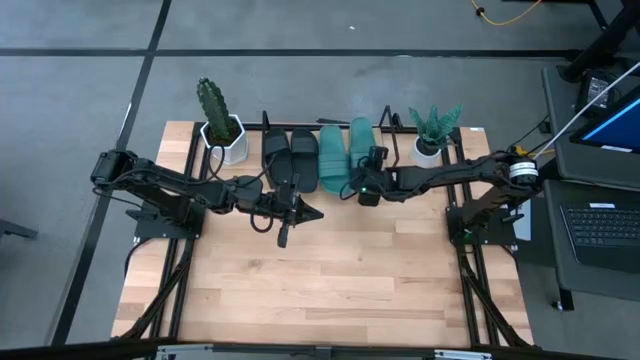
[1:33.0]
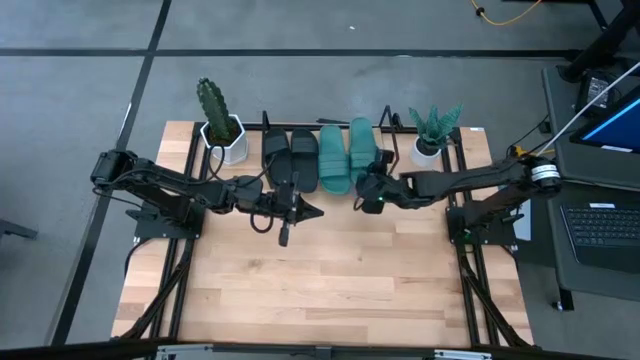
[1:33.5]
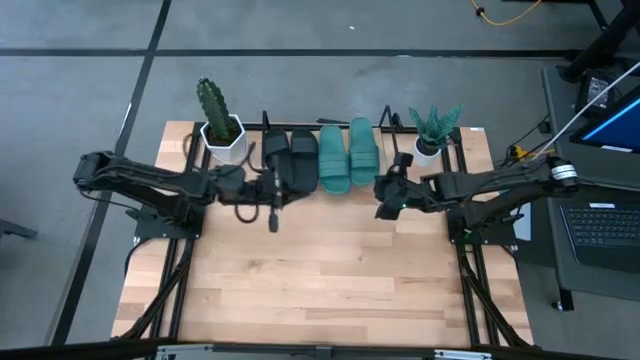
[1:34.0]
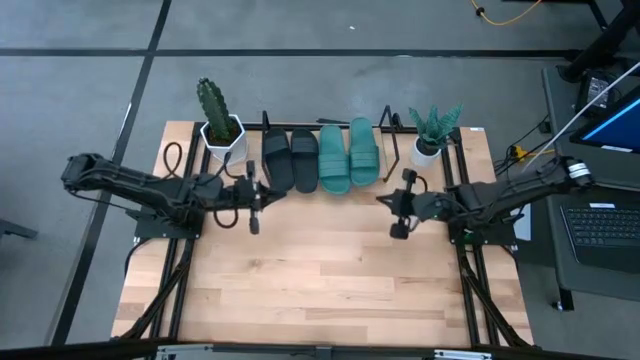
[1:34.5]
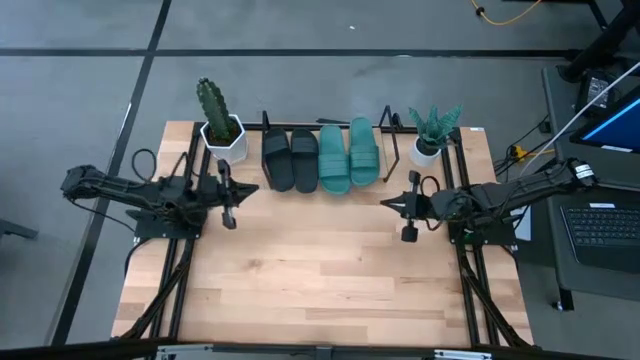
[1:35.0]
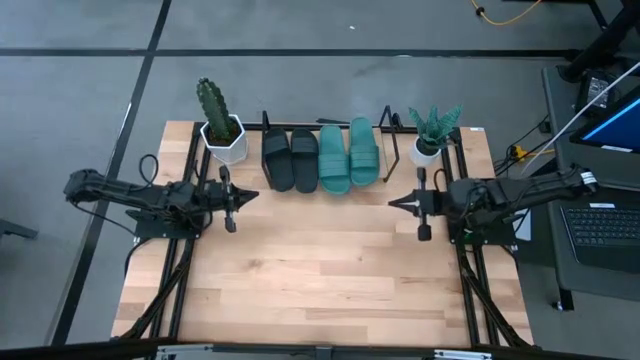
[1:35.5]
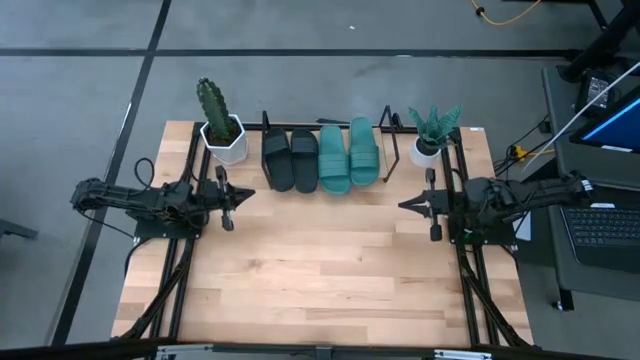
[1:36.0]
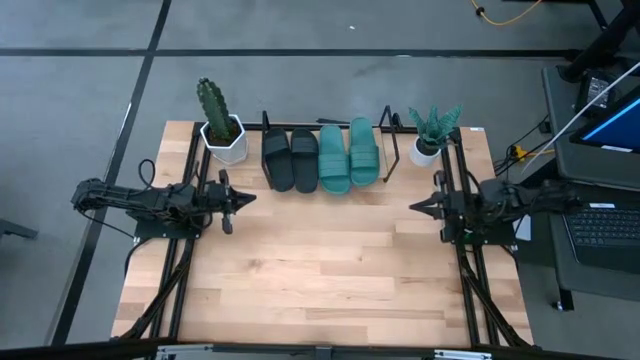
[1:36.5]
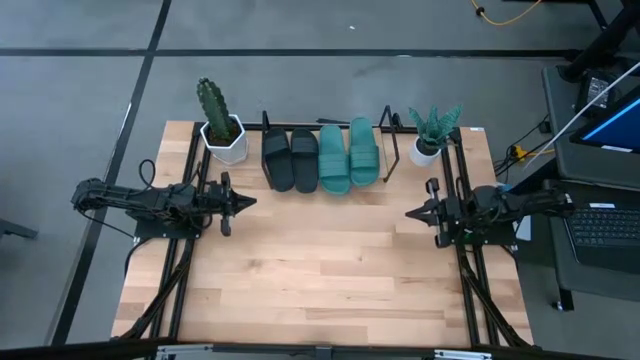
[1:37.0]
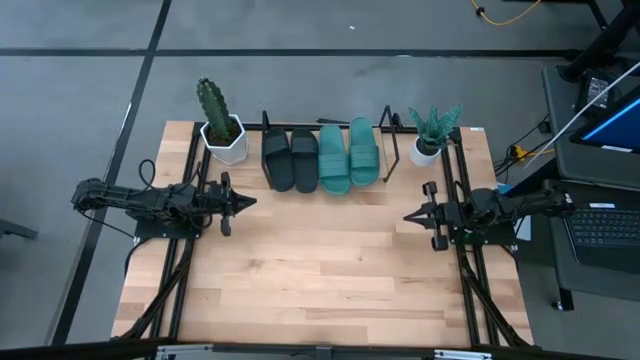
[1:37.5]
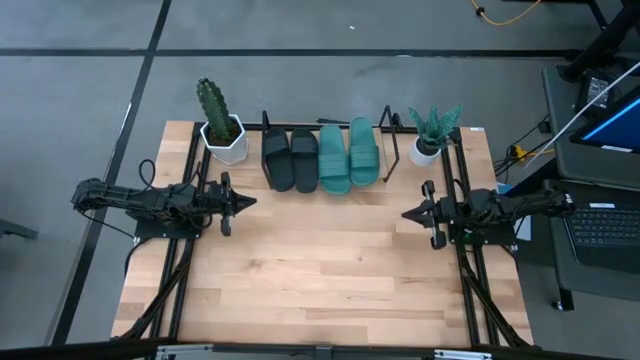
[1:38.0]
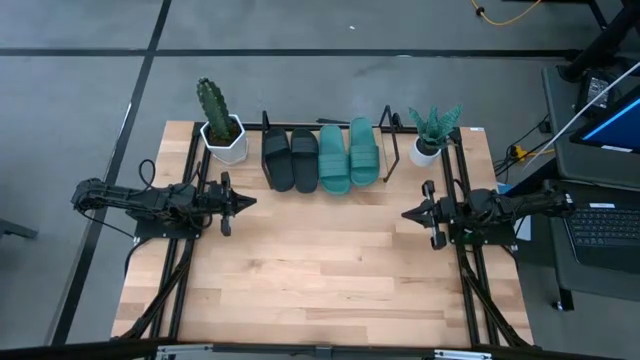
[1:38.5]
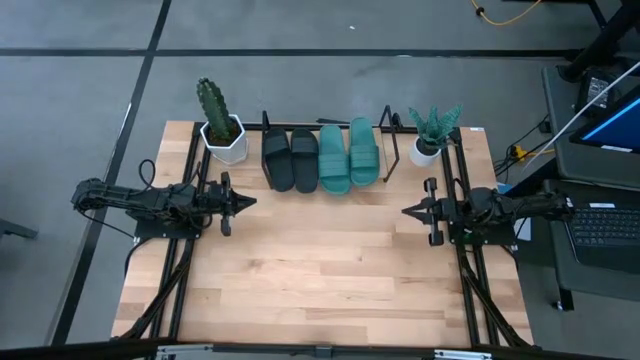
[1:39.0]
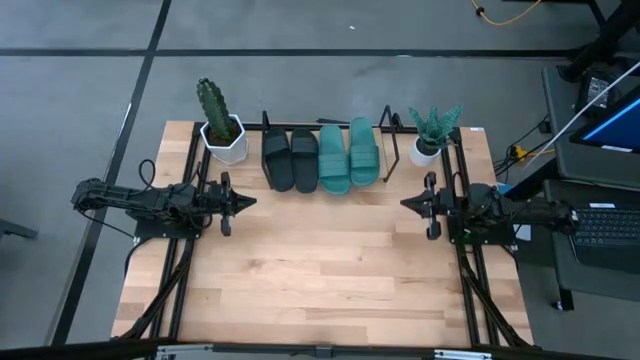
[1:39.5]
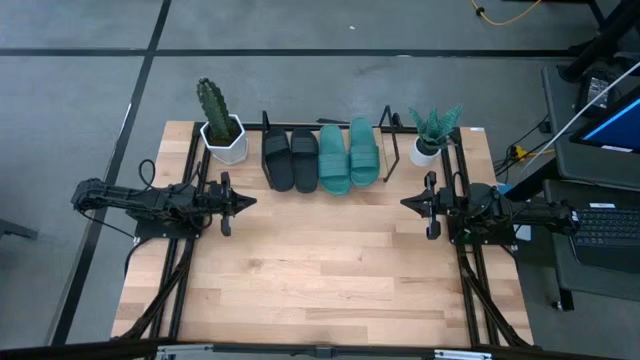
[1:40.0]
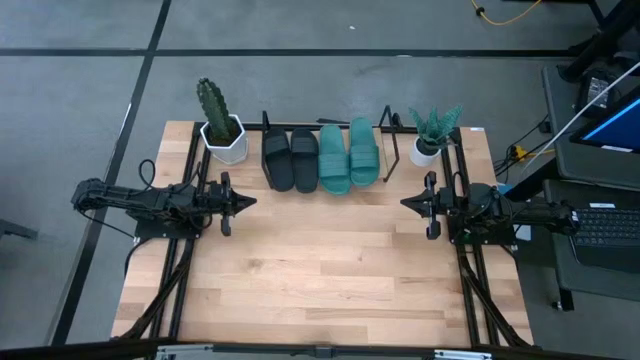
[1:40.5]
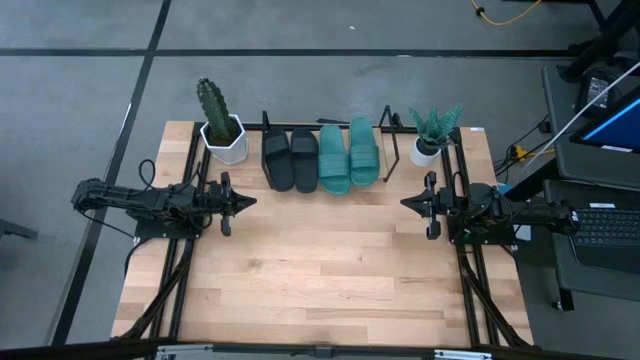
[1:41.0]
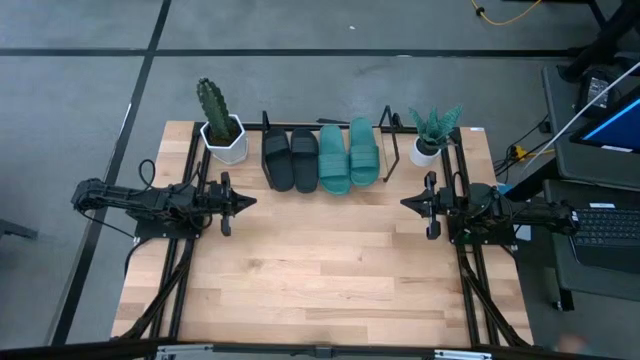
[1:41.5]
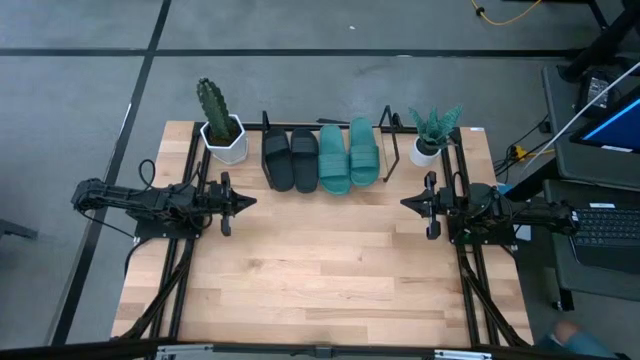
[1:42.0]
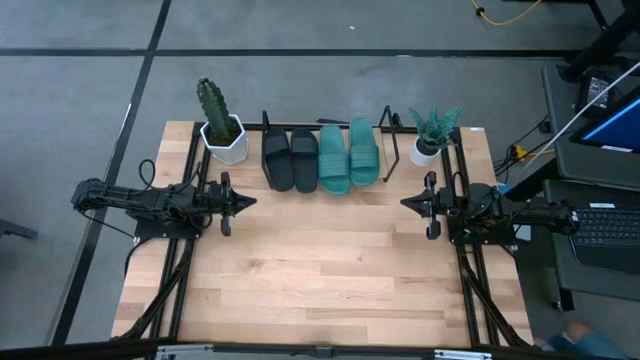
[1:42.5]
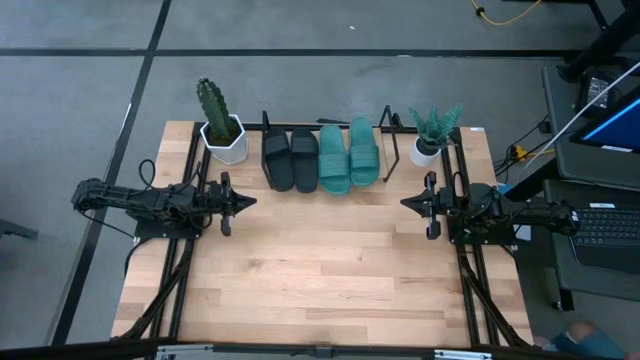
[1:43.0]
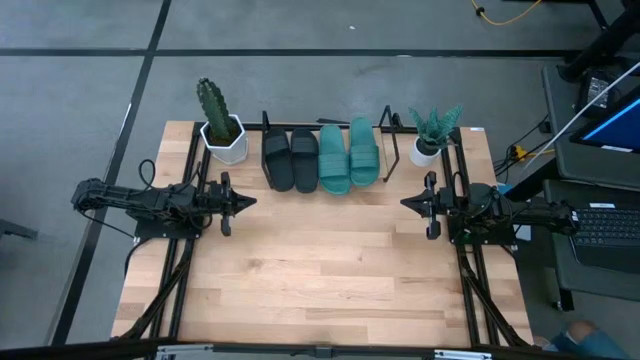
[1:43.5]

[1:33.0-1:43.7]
Task: Pick and place slides into the shelf
Return to Home Position

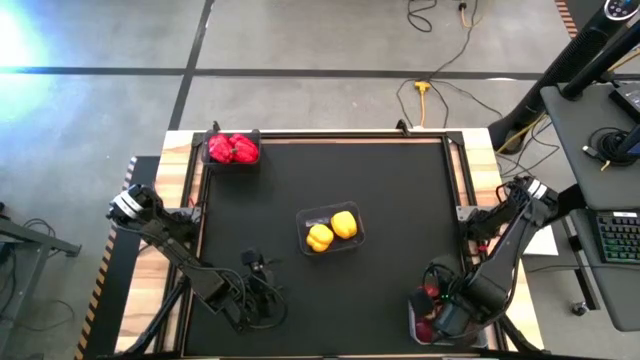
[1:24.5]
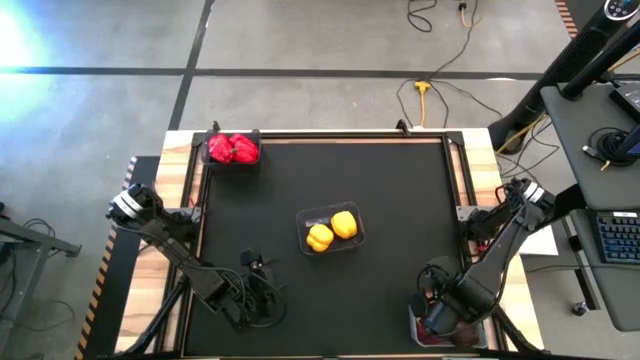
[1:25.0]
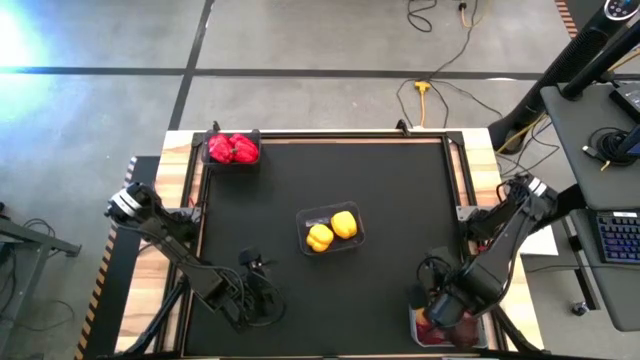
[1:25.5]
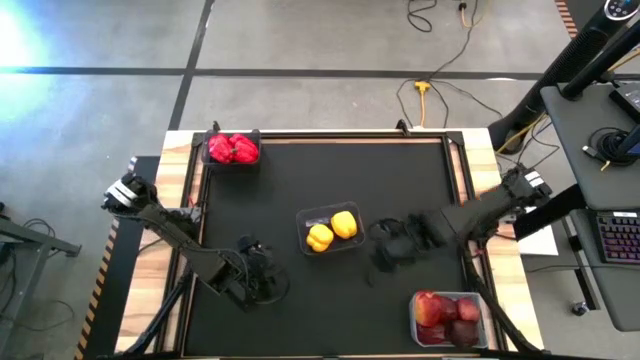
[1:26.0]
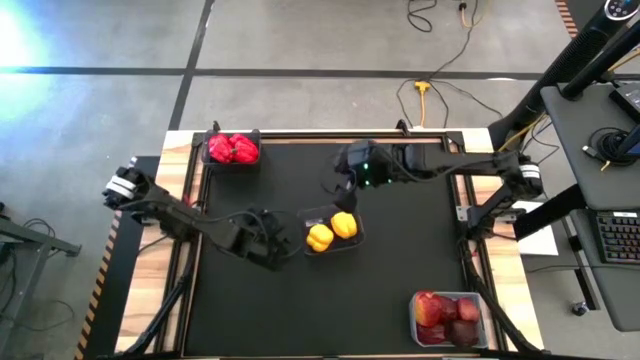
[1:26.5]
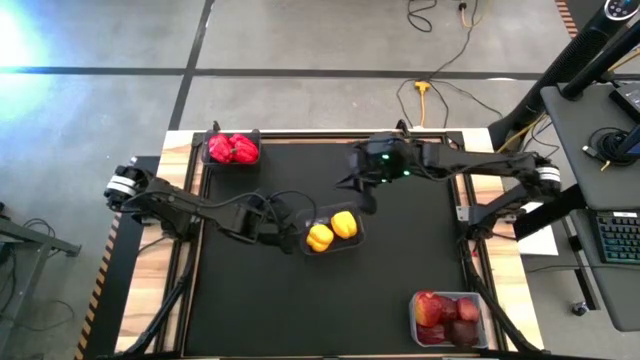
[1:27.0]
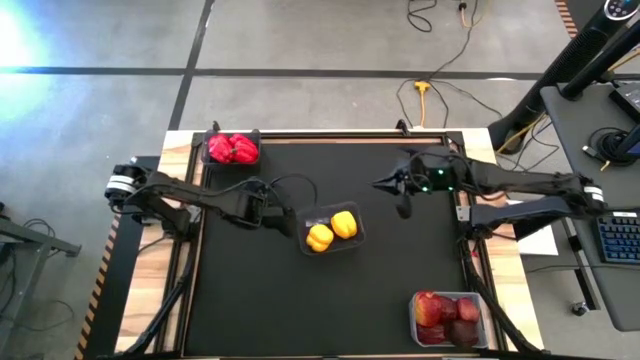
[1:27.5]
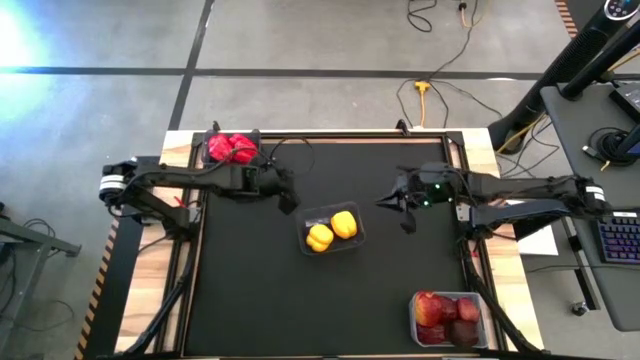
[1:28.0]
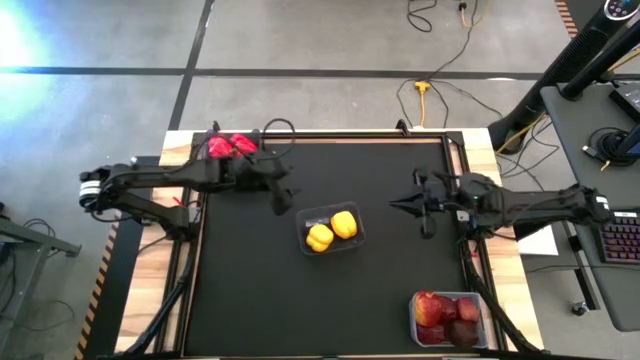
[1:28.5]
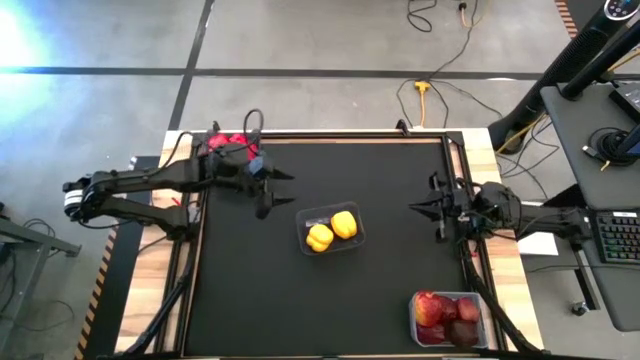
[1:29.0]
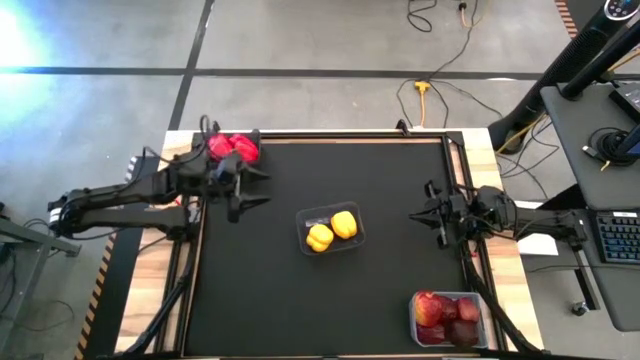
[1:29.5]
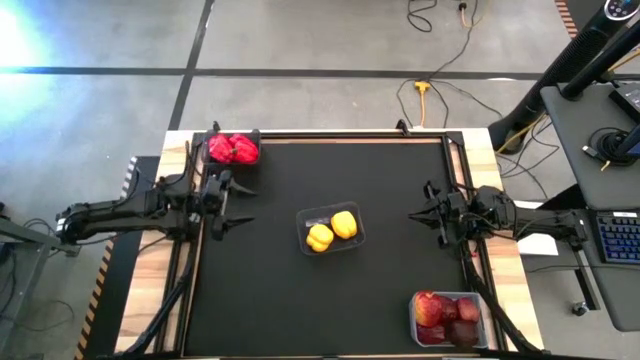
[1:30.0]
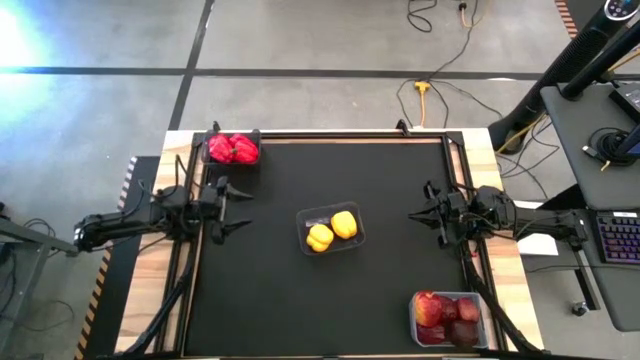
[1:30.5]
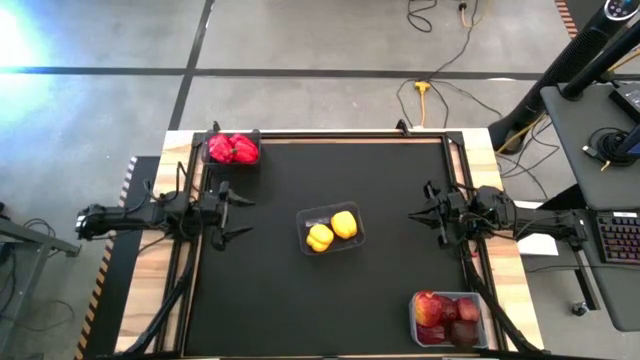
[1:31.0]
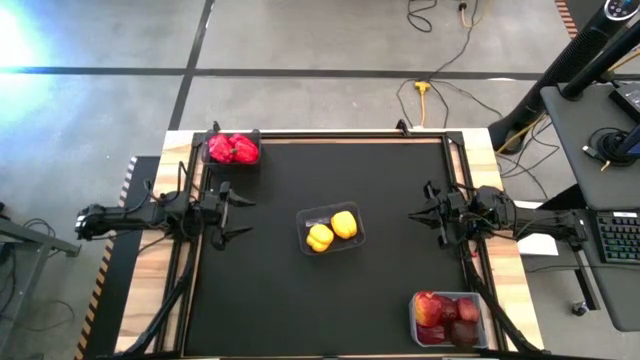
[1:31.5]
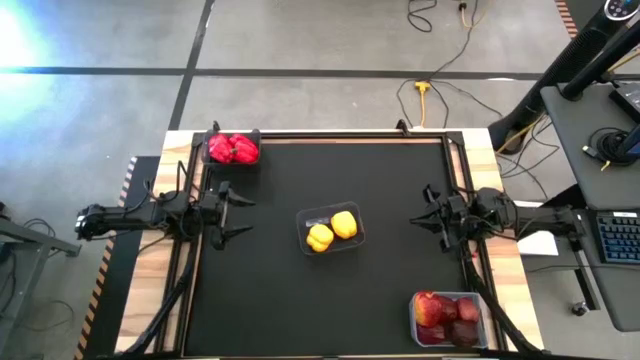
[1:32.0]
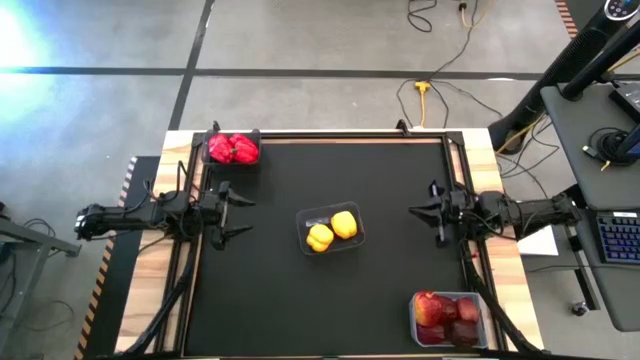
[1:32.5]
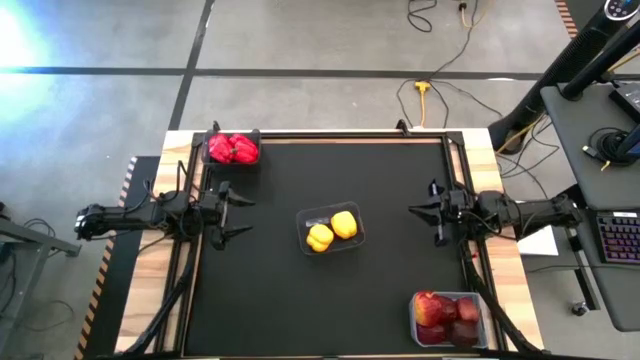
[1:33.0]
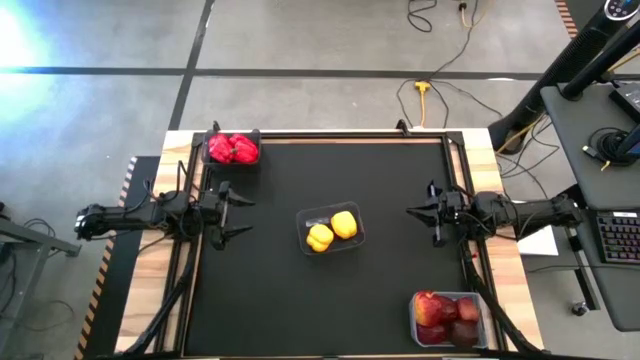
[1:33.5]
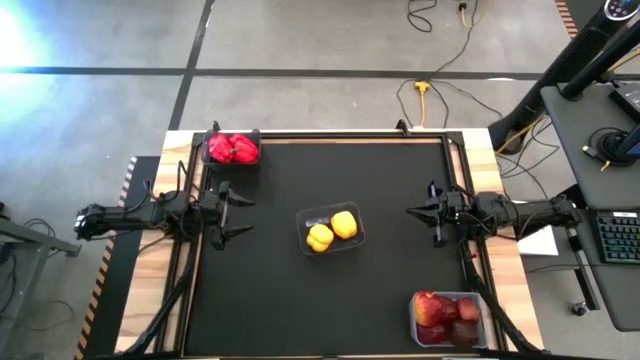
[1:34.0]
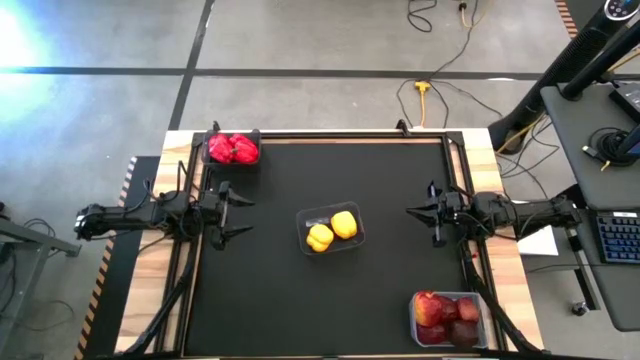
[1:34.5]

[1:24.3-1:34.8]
Task: Sort produce into baskets
Return to Home Position
